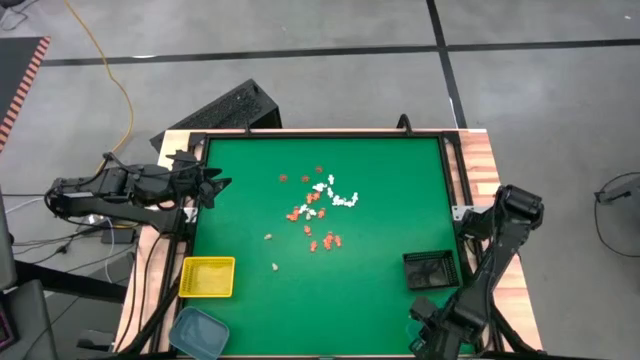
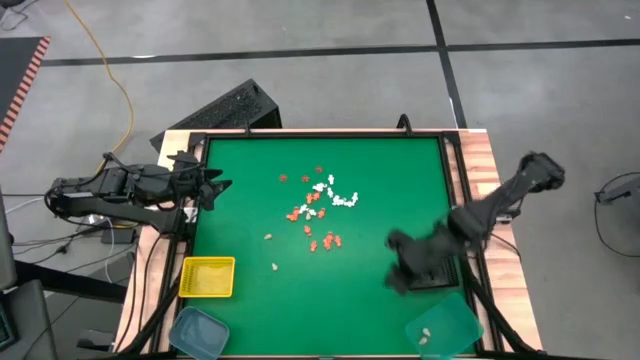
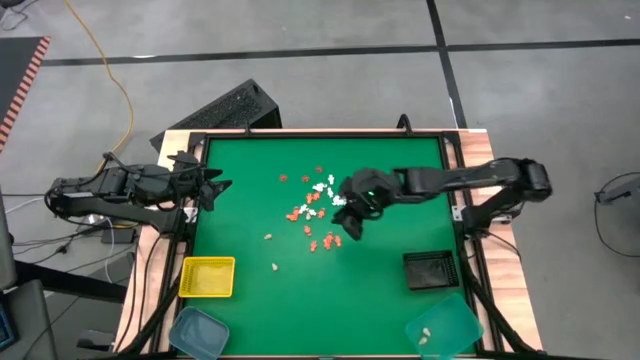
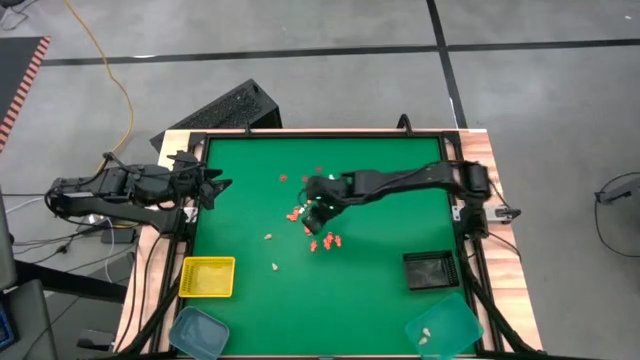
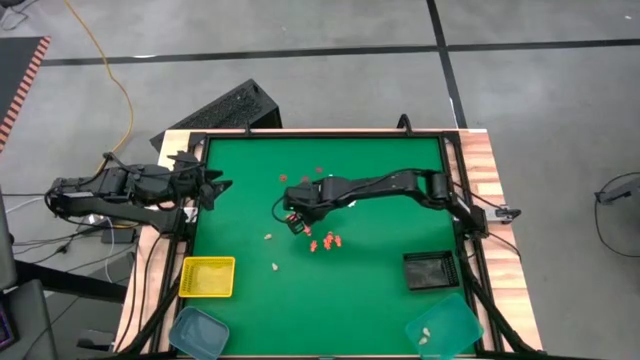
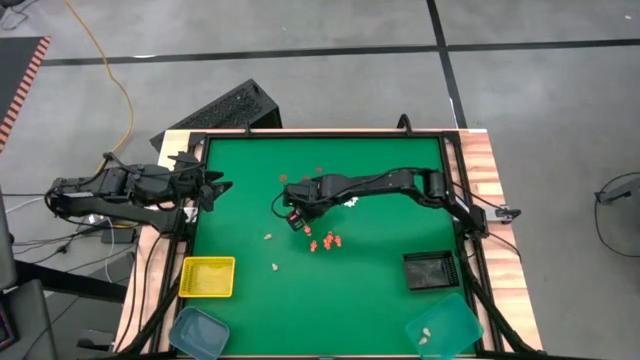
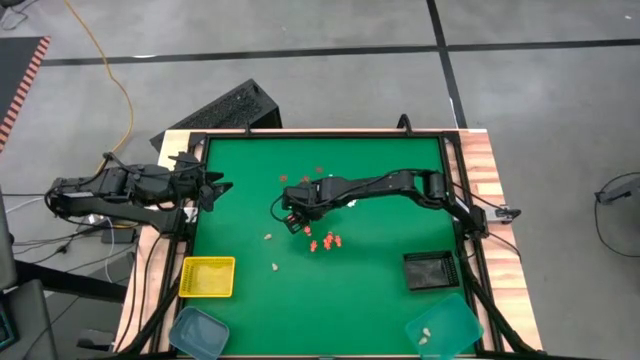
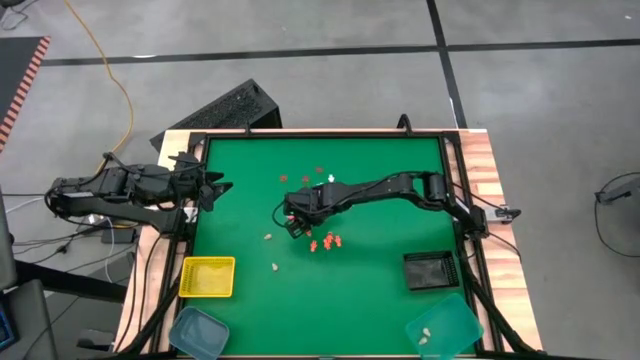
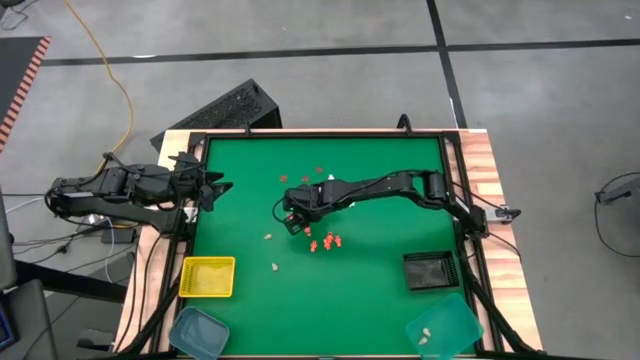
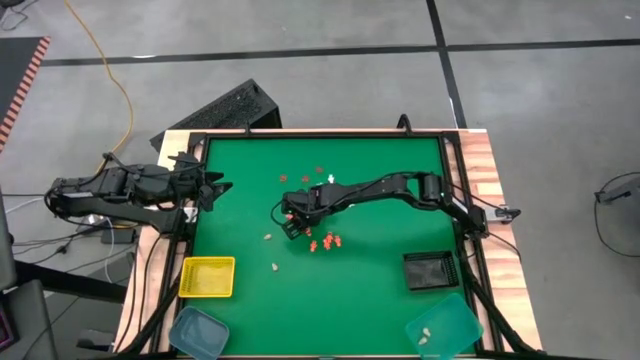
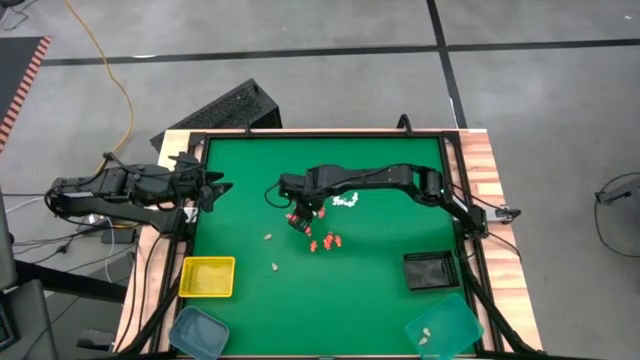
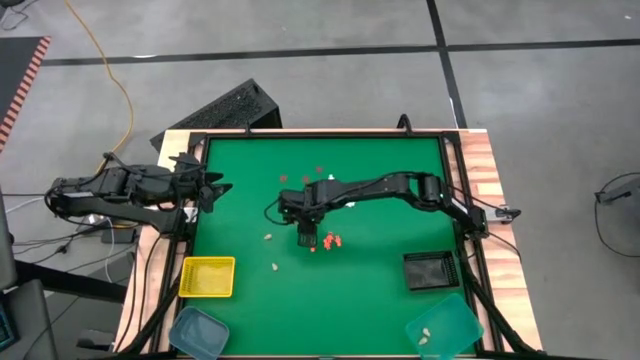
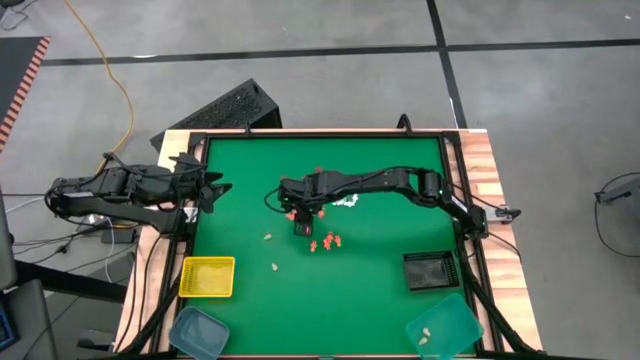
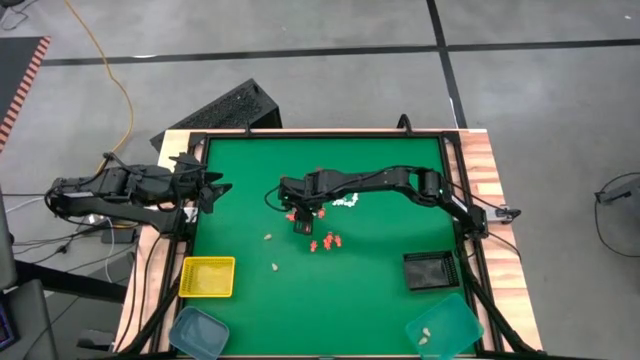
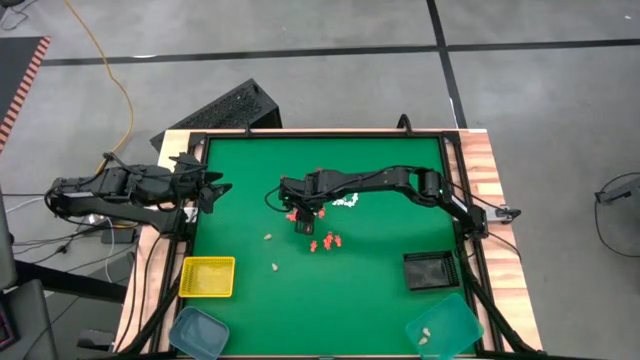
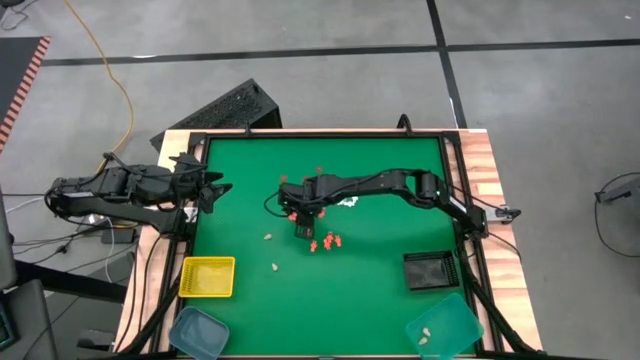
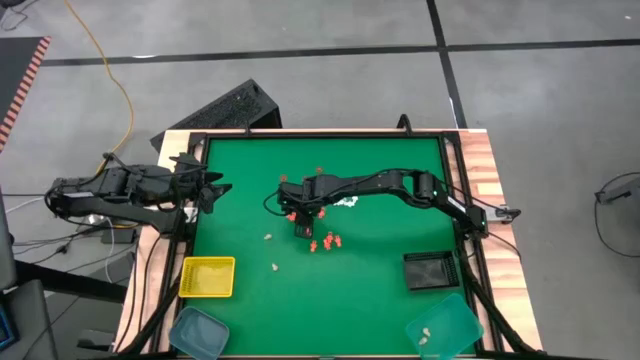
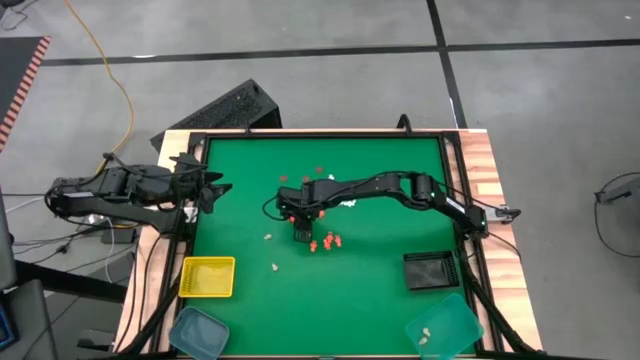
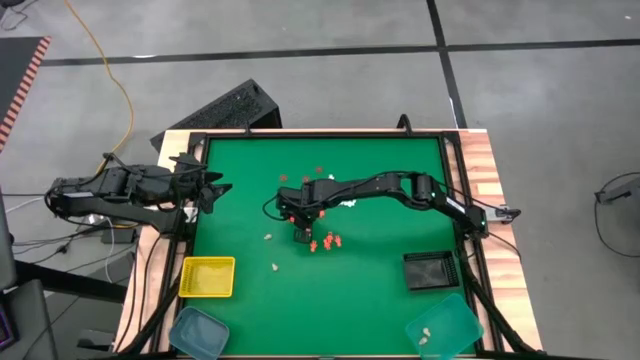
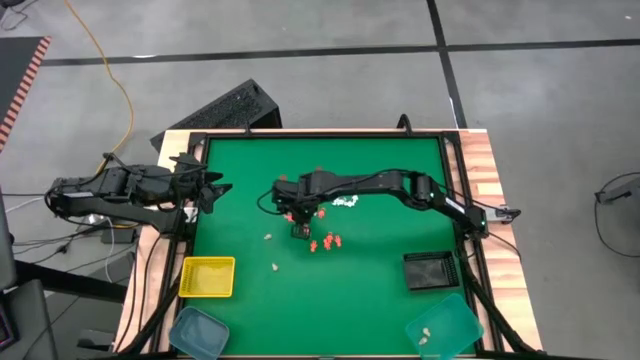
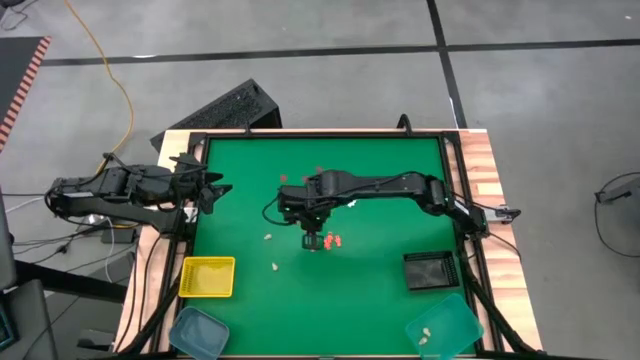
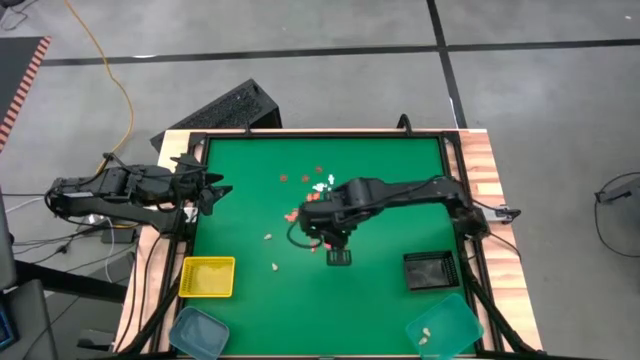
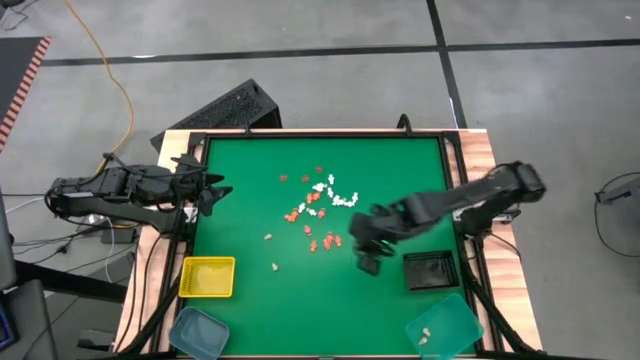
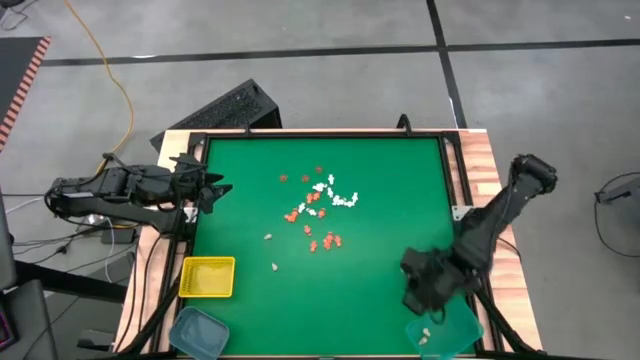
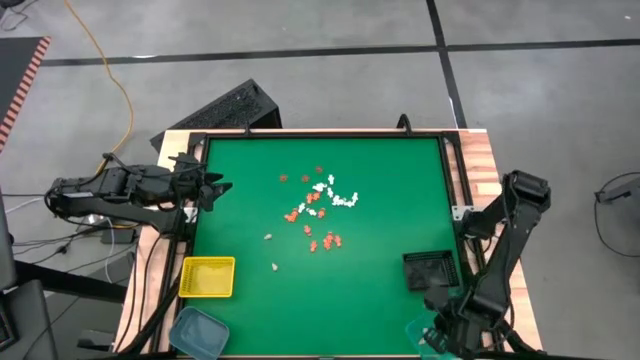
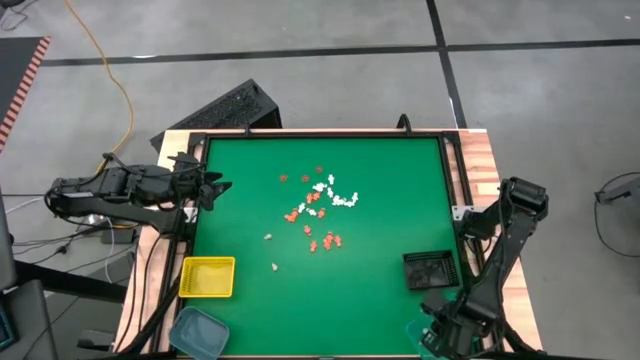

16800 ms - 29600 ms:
Task: Sort Halloween decoration
Put the top right skull model into the green bin

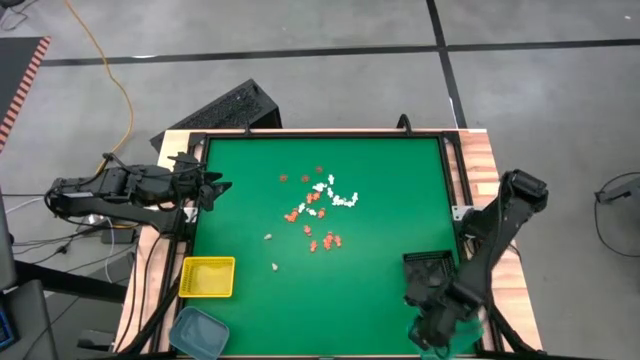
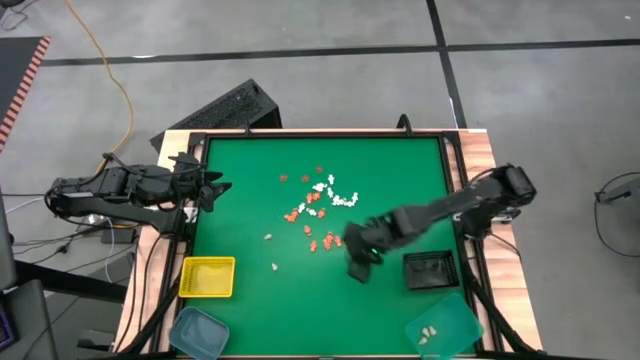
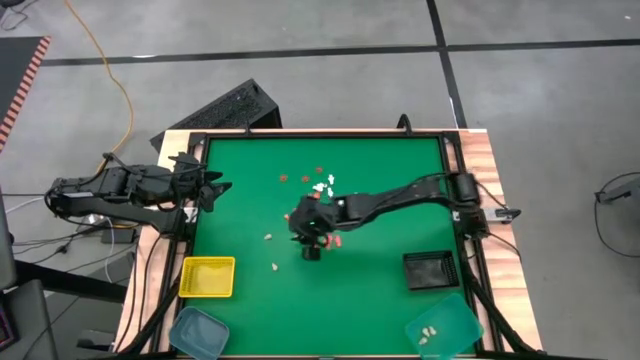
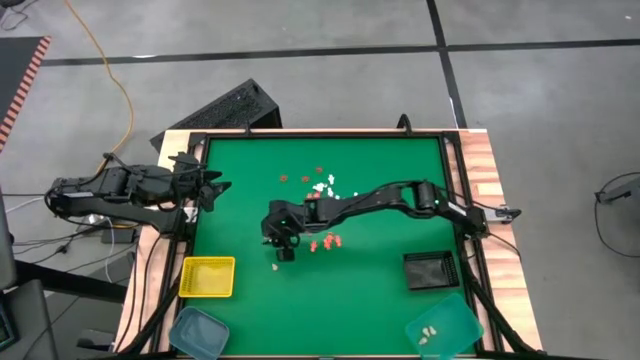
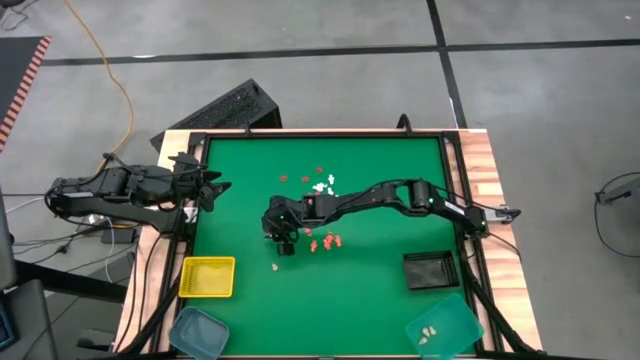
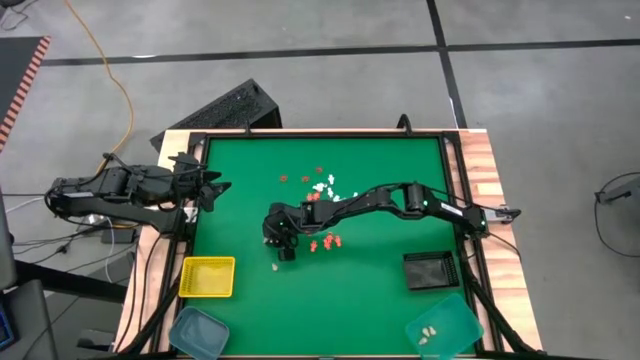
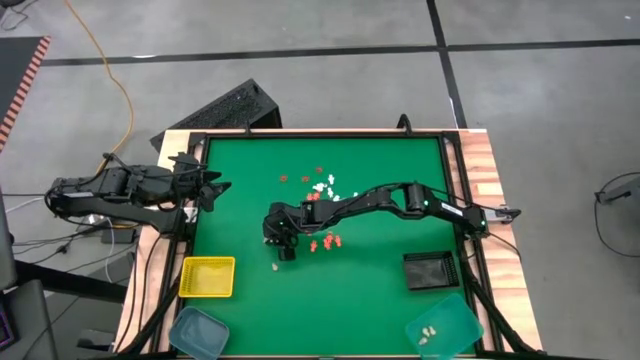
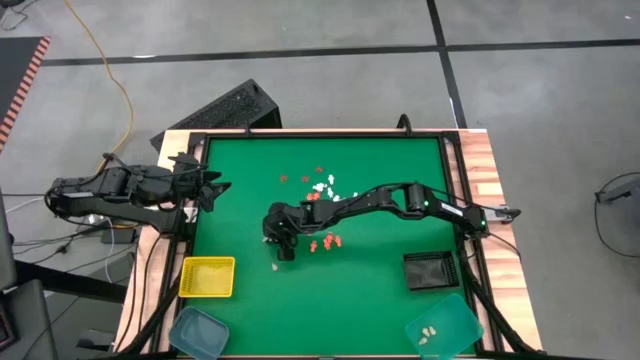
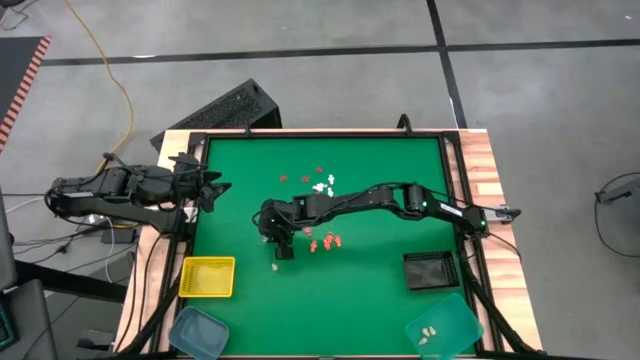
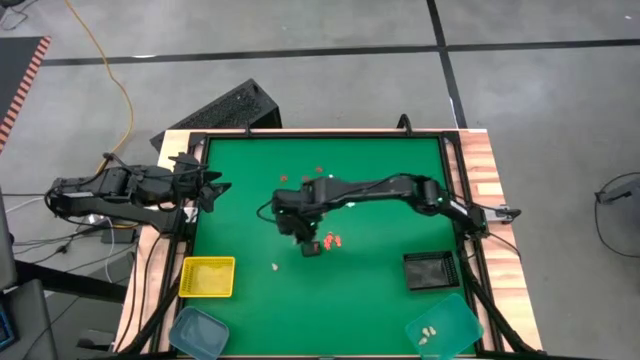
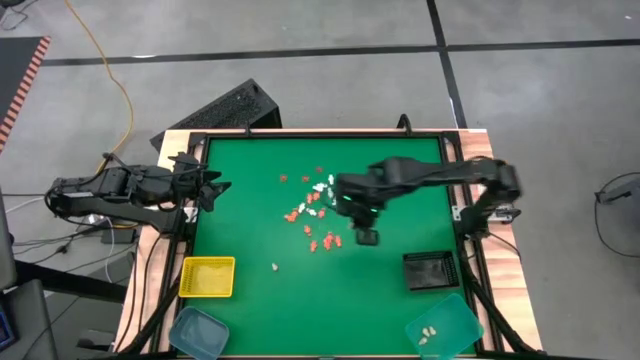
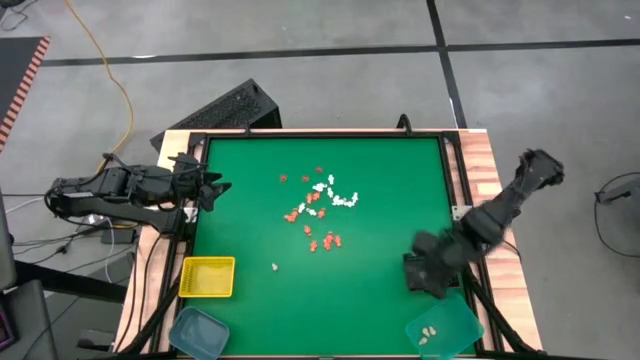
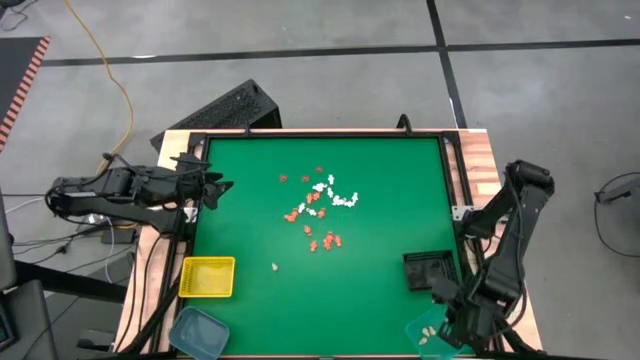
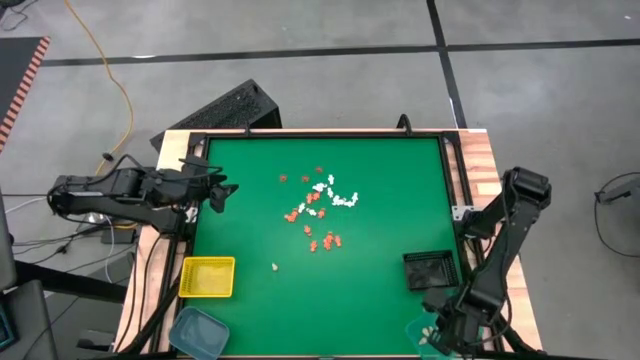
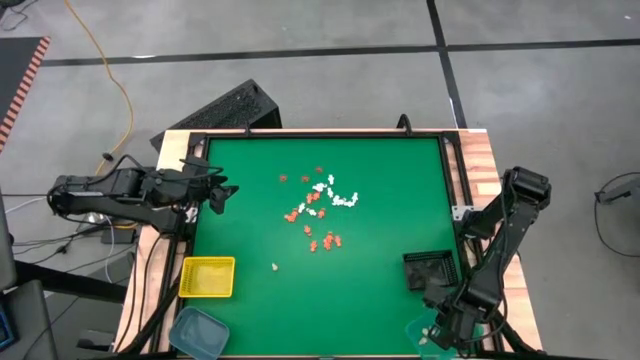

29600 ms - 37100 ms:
Put the top skull model into the green bin

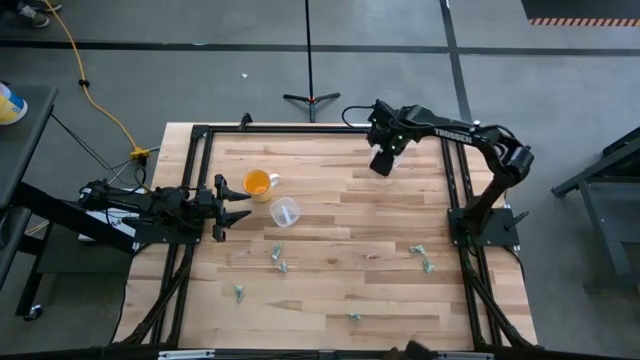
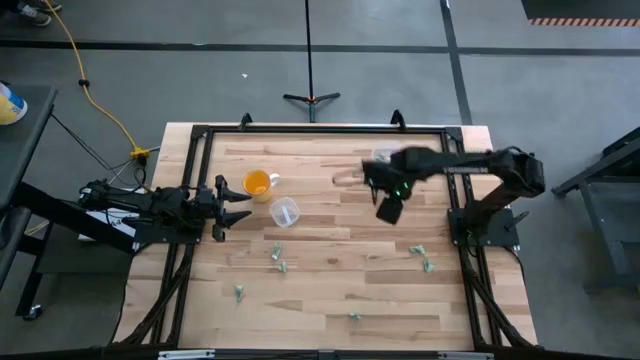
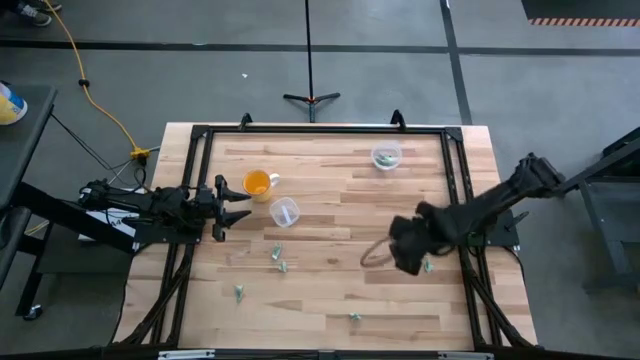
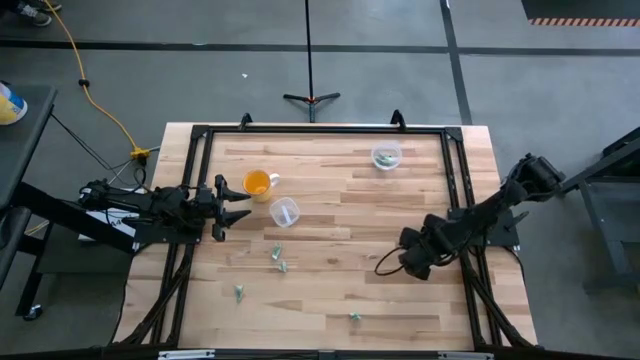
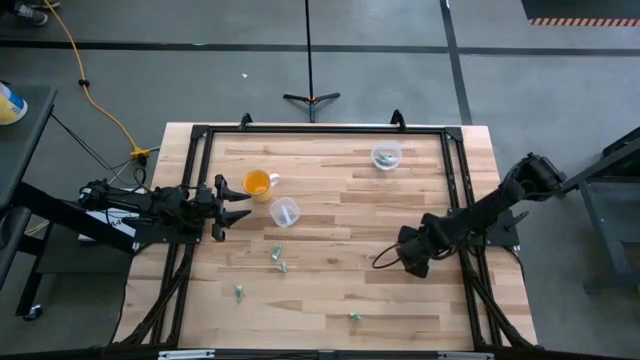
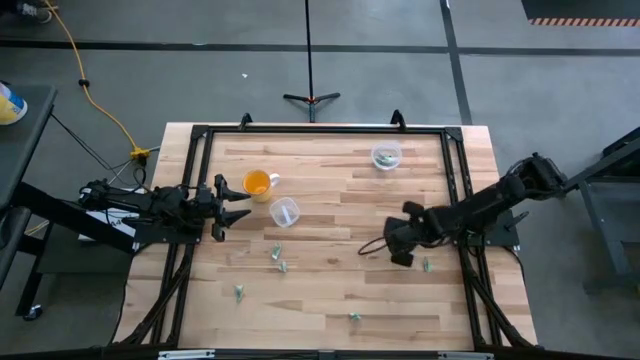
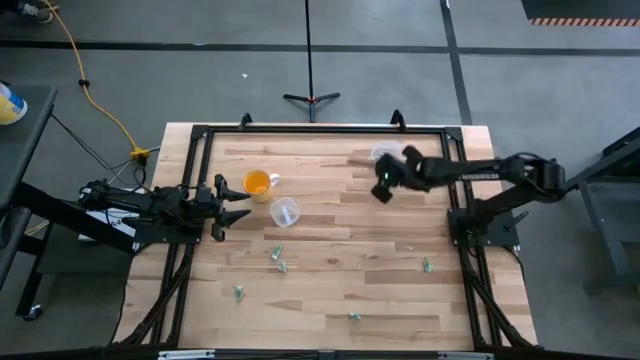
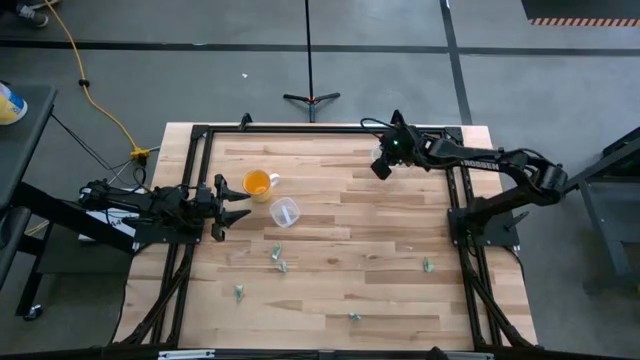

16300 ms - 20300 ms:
Task: Pick and place Stevia / Truvia into bins
Put the stevia packet into the top transparent container
